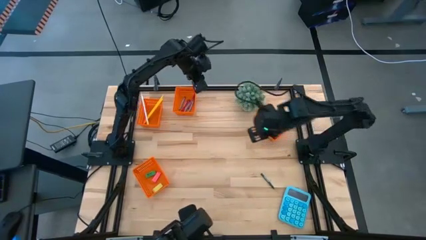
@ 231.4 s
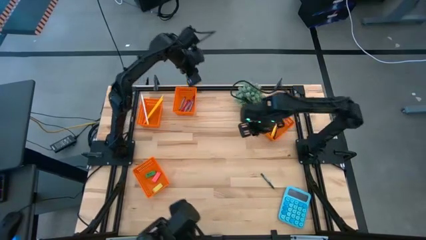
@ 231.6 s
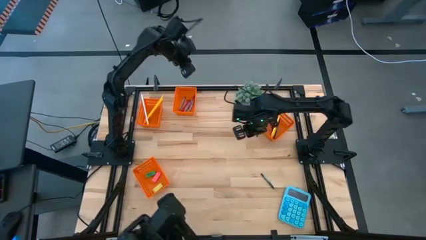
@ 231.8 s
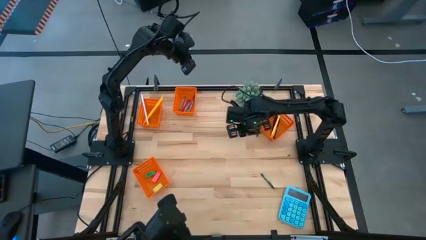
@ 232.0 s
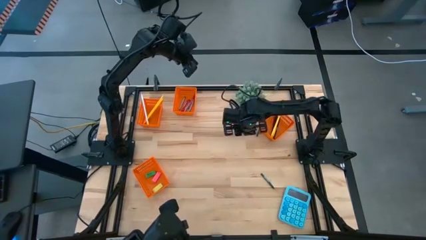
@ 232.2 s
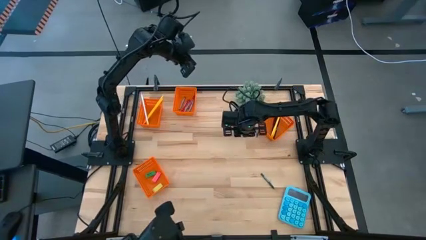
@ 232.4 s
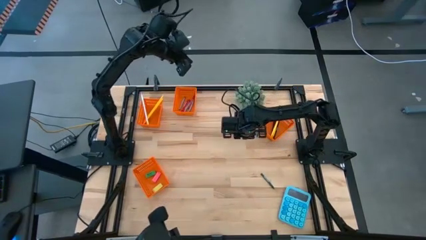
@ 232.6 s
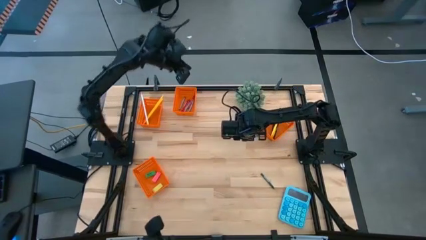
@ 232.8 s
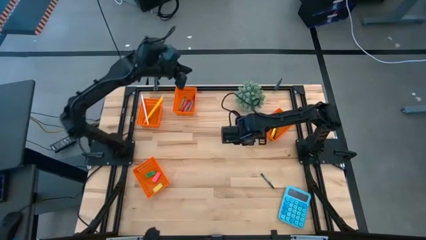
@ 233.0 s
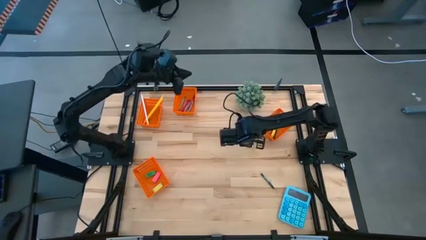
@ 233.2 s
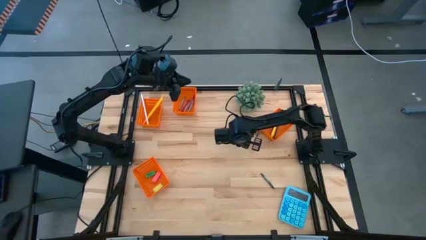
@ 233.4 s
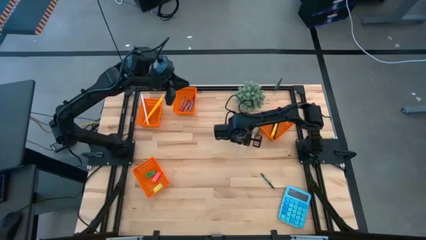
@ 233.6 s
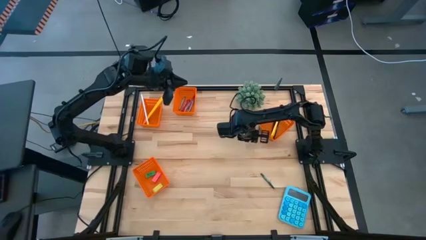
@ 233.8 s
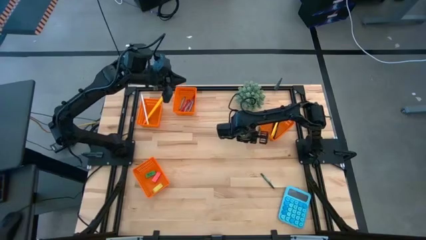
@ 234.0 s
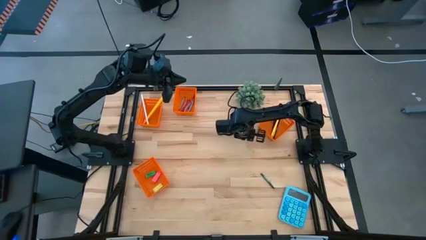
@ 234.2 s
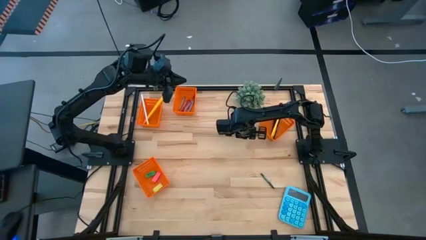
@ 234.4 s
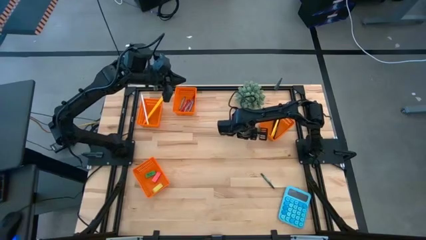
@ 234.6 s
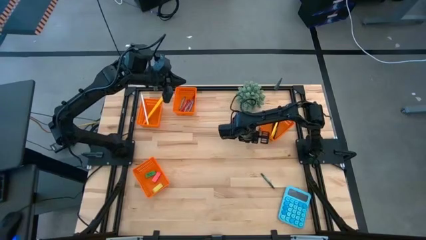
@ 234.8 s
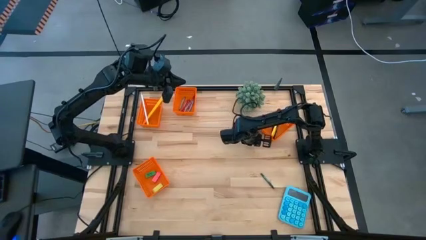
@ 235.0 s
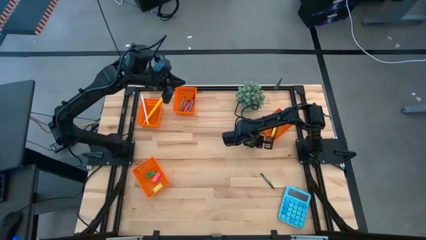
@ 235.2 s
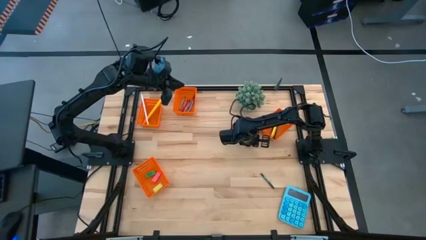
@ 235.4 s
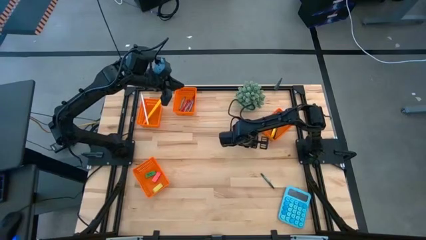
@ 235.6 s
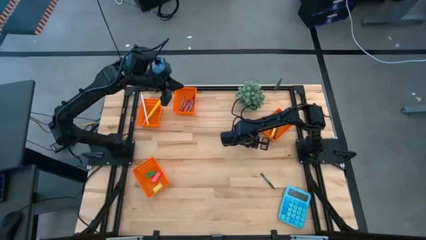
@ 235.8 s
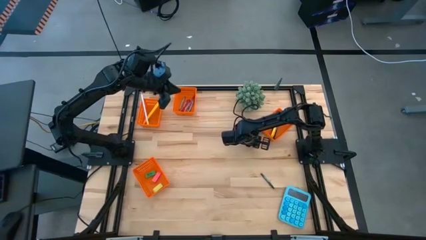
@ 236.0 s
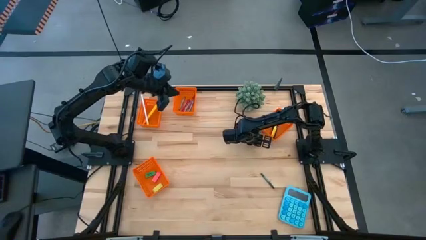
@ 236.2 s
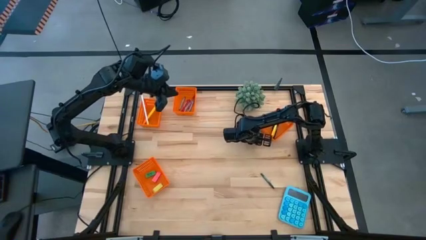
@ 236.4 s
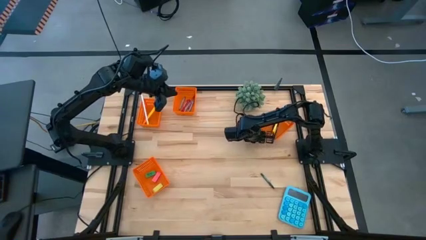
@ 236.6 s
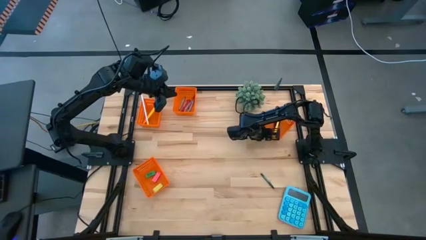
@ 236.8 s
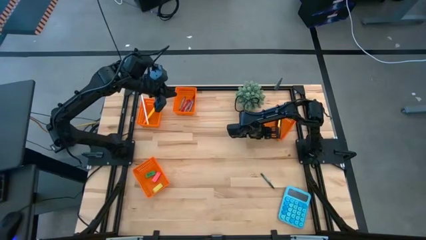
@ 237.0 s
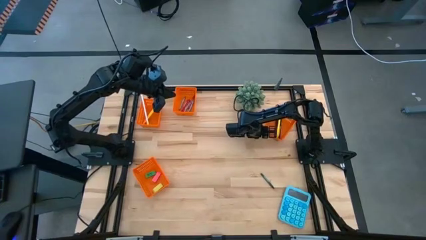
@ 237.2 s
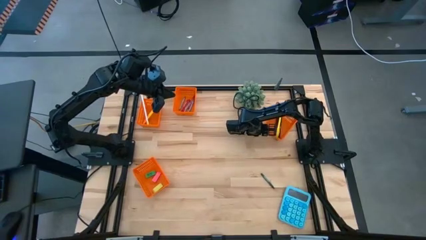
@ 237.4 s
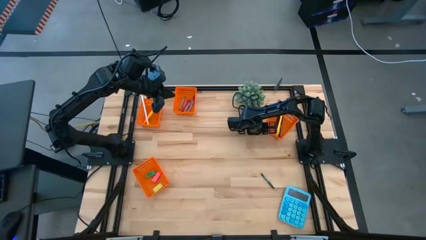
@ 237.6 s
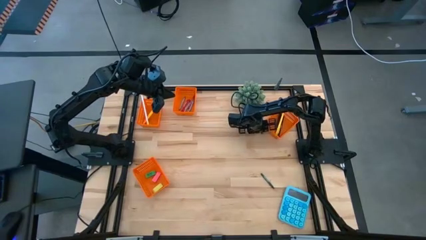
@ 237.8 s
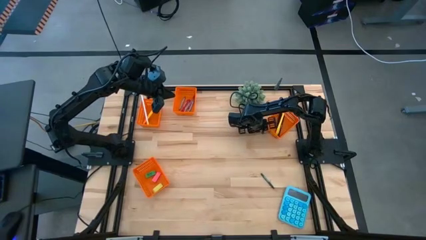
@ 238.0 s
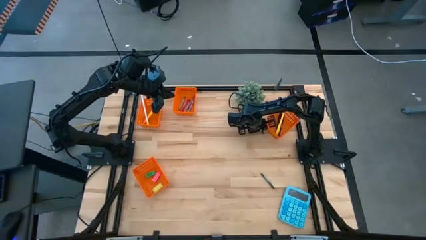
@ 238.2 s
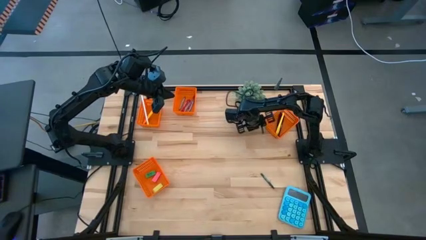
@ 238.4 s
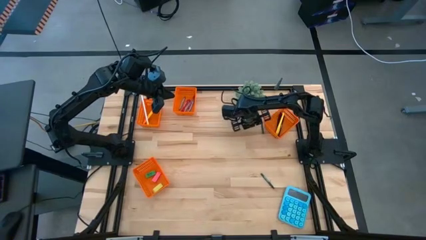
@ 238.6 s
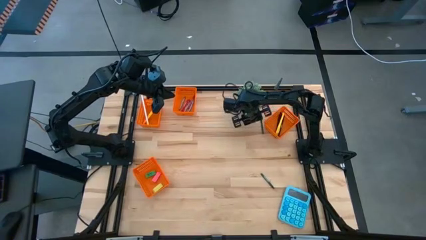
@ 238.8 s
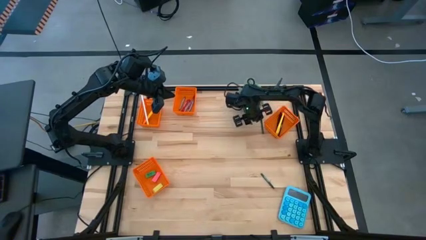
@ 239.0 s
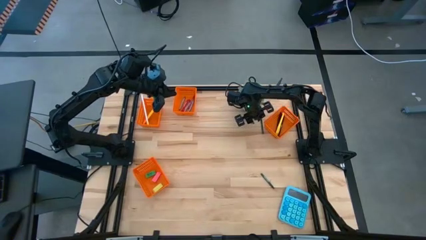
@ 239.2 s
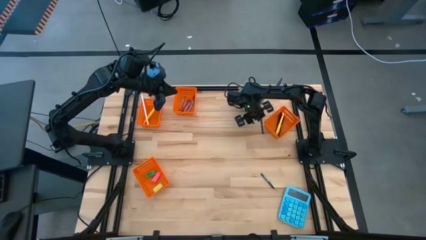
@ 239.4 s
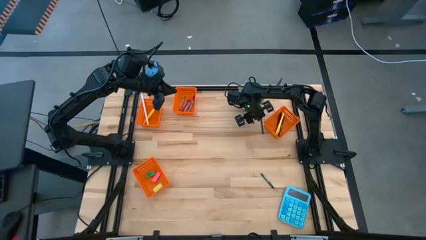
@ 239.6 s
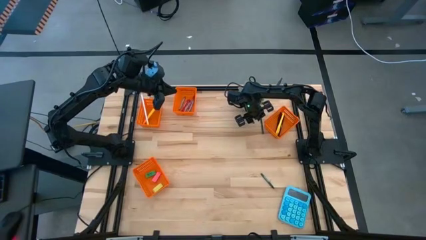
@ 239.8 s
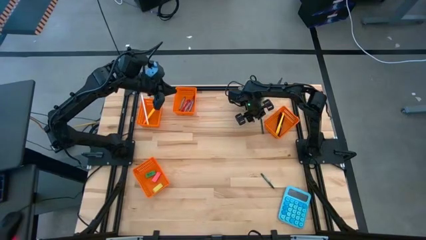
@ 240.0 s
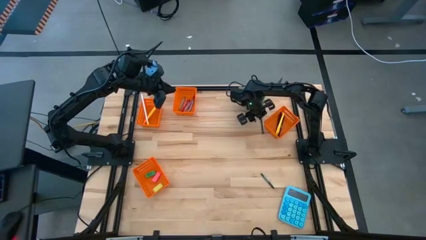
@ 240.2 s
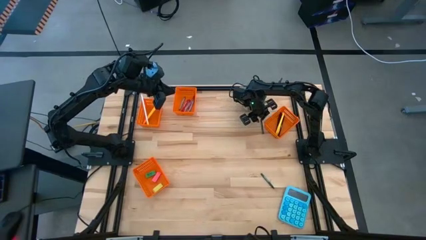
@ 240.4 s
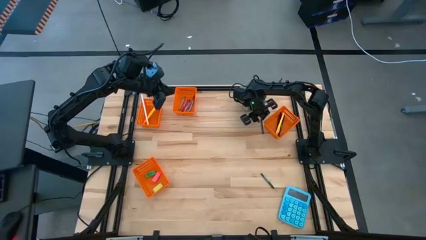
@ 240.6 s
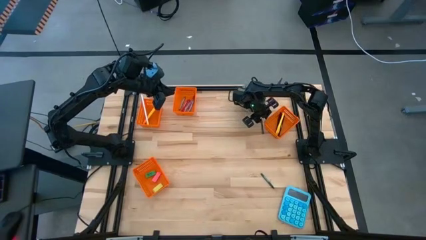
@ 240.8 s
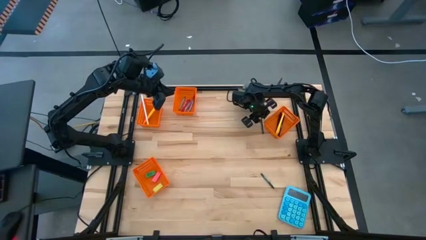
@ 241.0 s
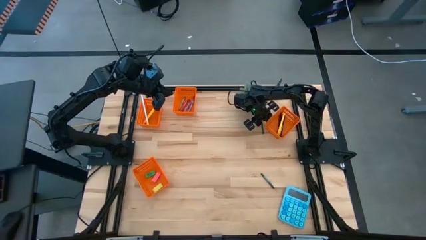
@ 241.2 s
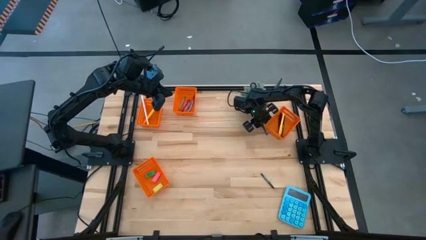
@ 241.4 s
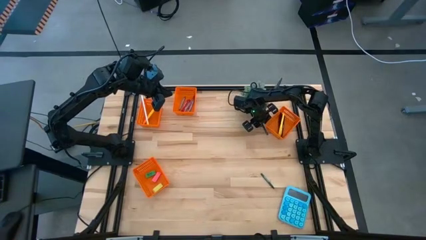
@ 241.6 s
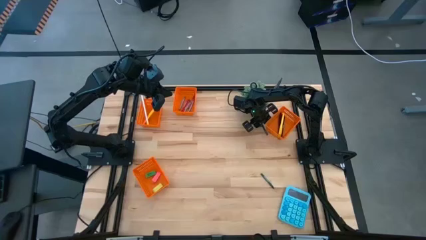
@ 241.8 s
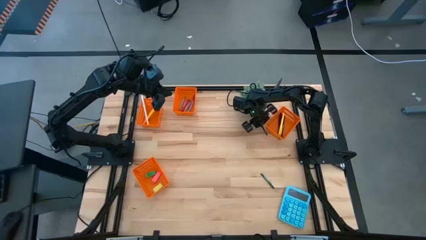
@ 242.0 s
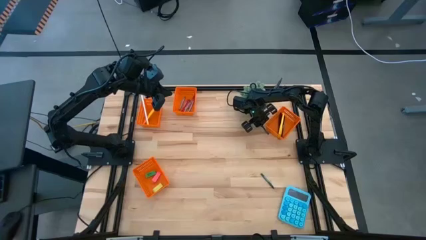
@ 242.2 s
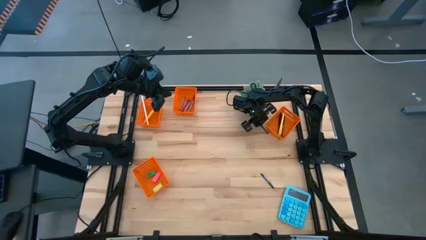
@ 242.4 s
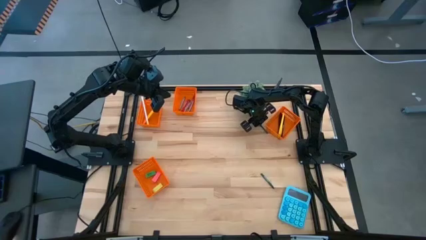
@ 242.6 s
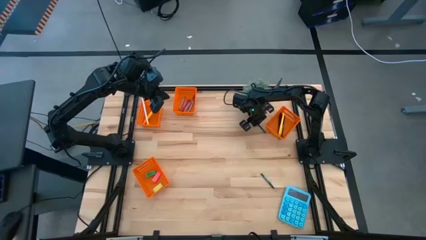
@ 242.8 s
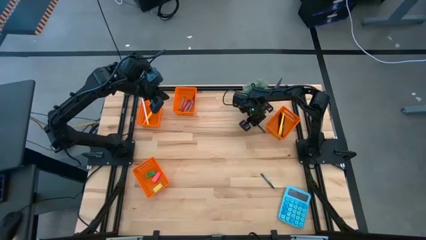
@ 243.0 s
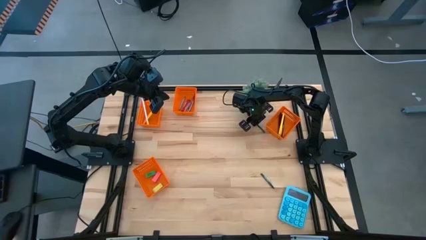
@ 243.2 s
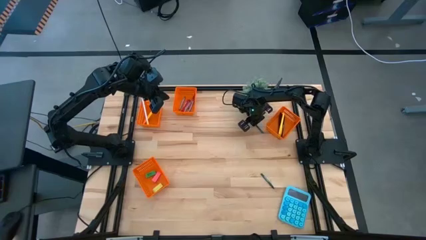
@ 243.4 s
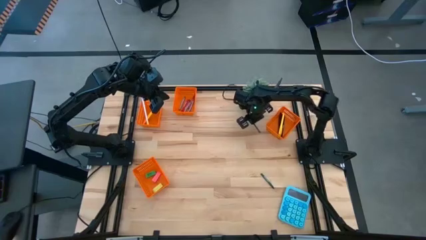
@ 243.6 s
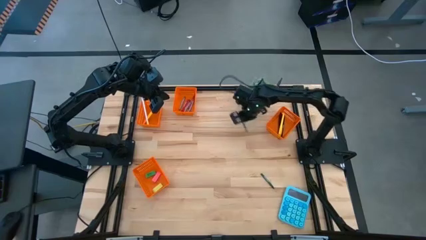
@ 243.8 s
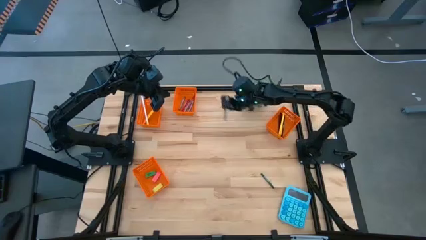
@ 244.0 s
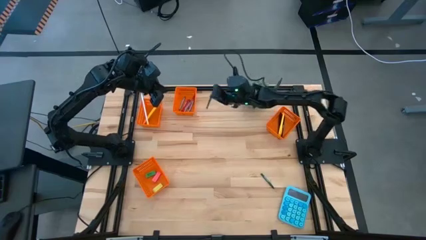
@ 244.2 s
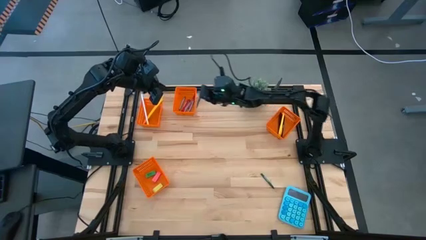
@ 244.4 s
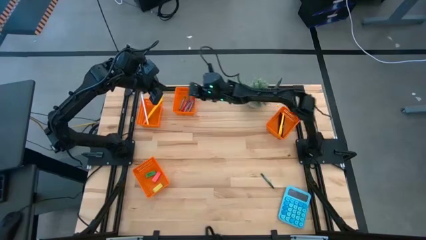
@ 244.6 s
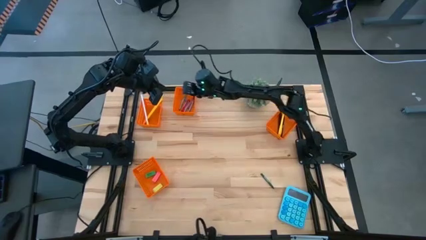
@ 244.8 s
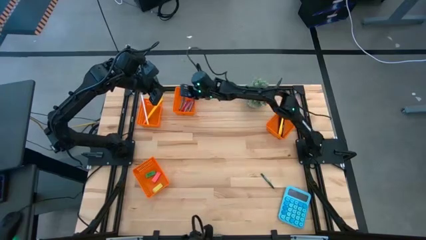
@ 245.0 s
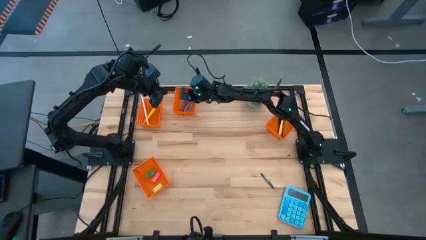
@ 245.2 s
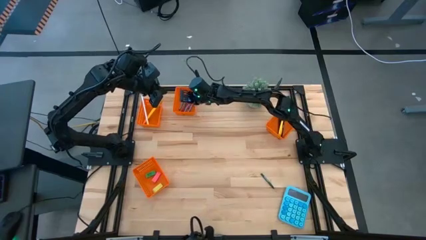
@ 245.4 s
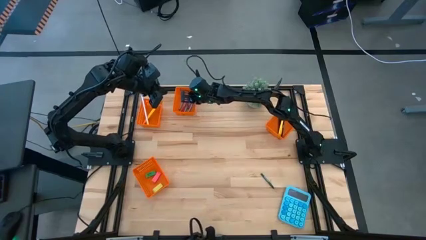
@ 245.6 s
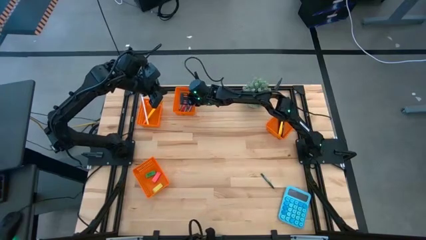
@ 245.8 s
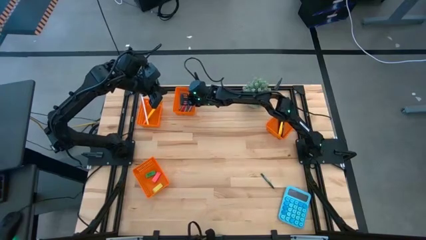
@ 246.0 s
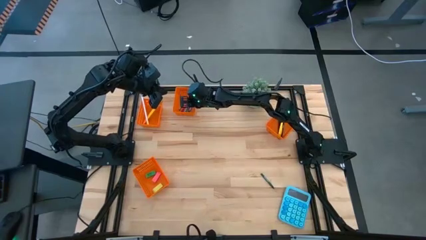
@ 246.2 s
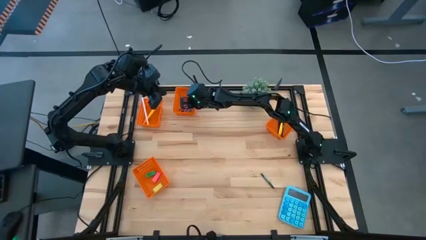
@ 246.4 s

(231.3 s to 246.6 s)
Task: Sort crayons/erasers/pens/pencils in bins
Put the left green crayon into the middle orange bin
